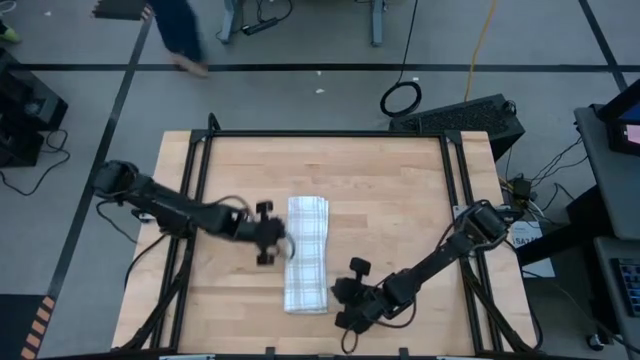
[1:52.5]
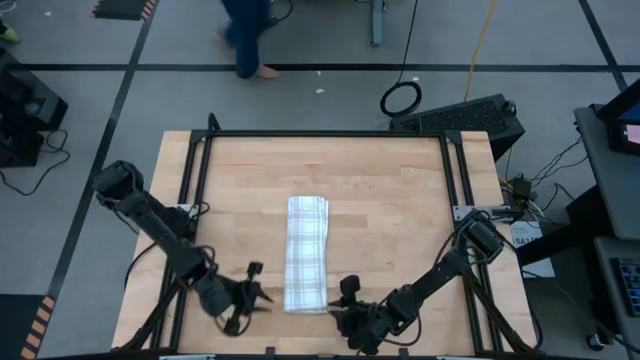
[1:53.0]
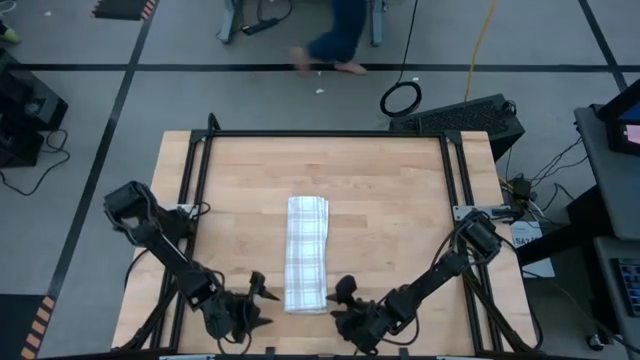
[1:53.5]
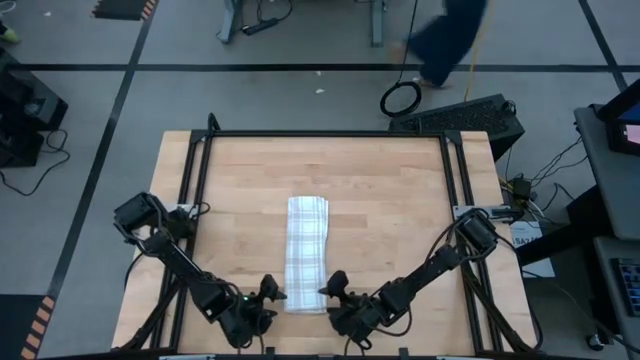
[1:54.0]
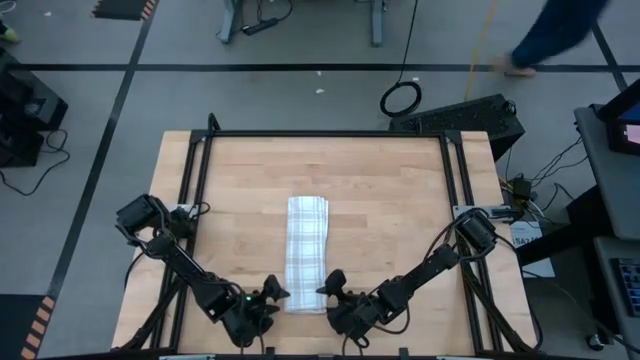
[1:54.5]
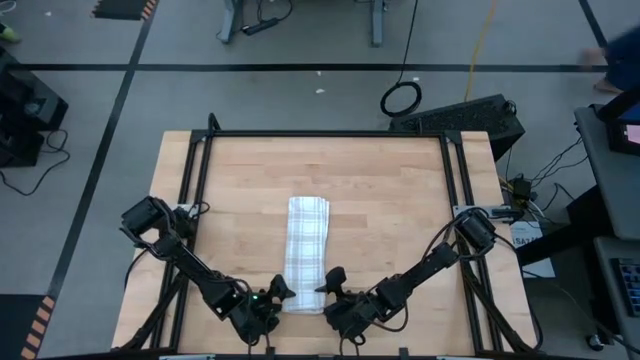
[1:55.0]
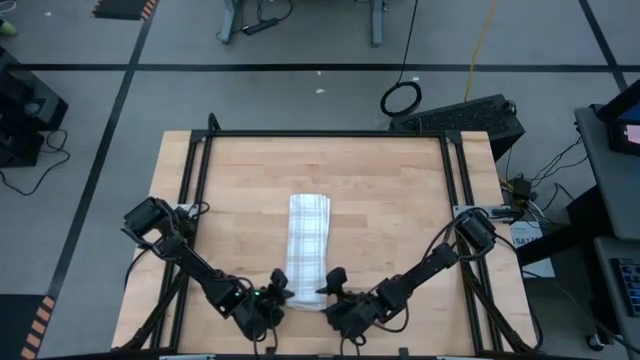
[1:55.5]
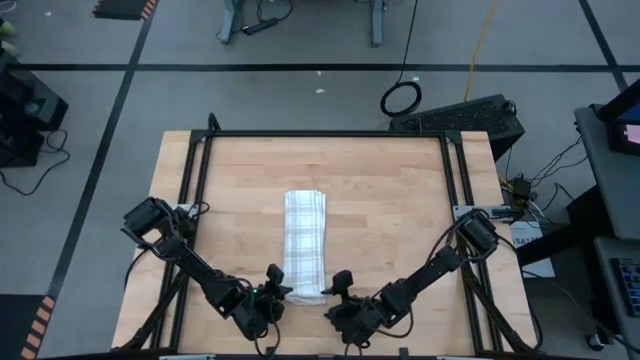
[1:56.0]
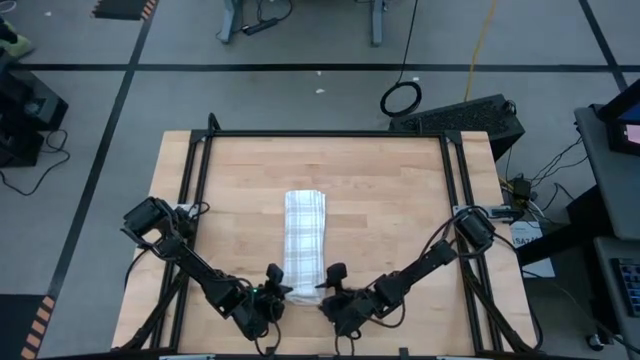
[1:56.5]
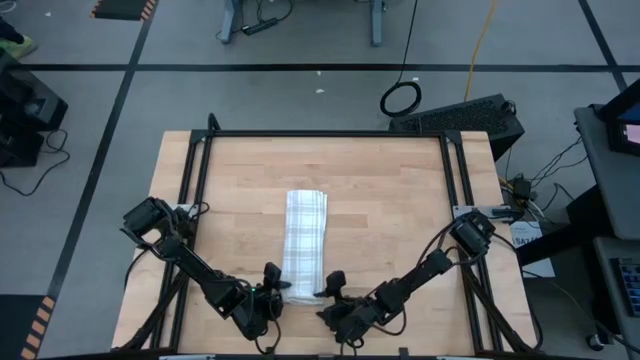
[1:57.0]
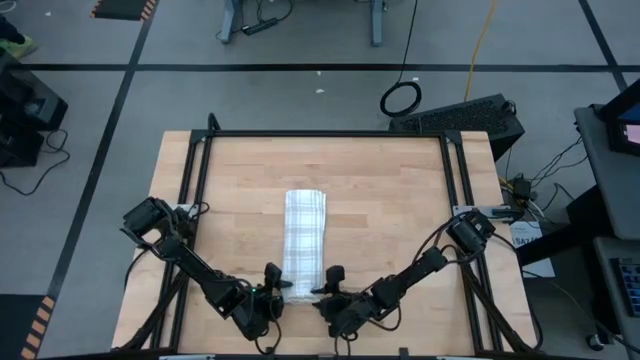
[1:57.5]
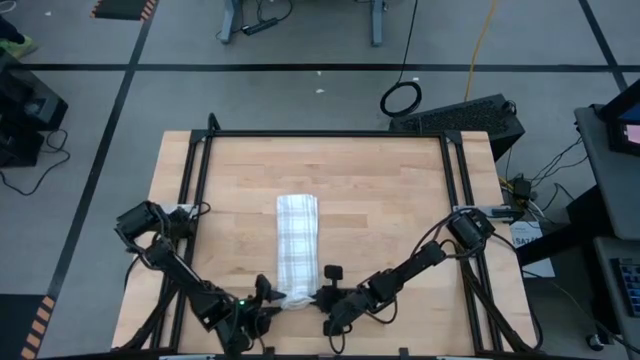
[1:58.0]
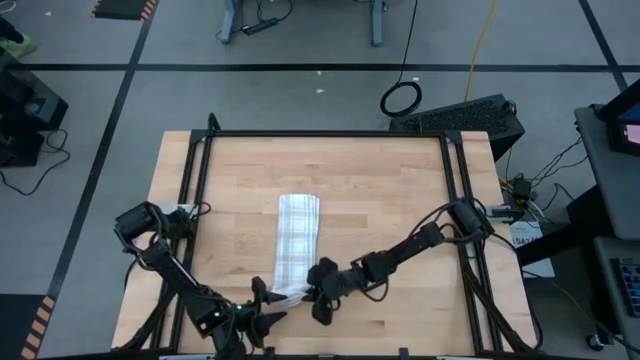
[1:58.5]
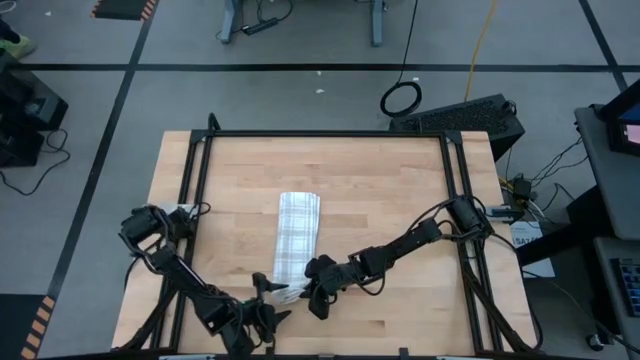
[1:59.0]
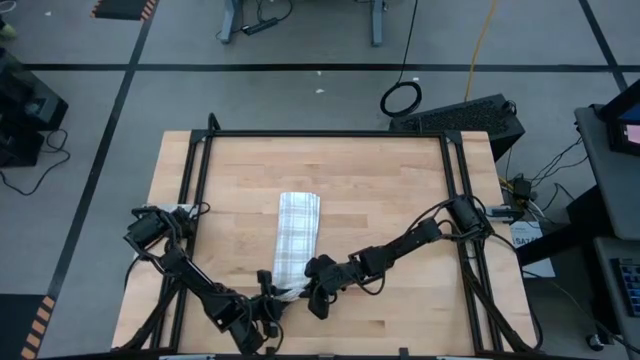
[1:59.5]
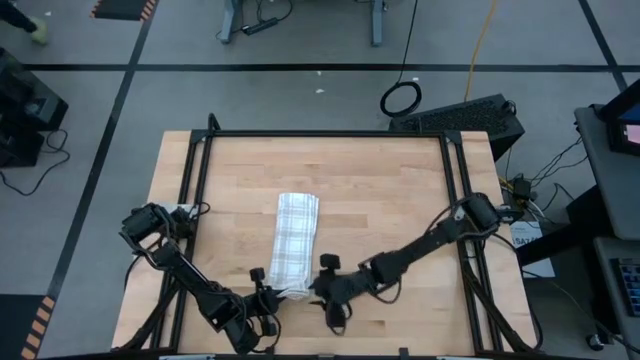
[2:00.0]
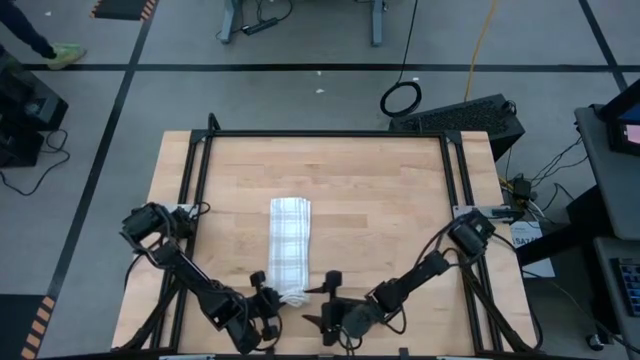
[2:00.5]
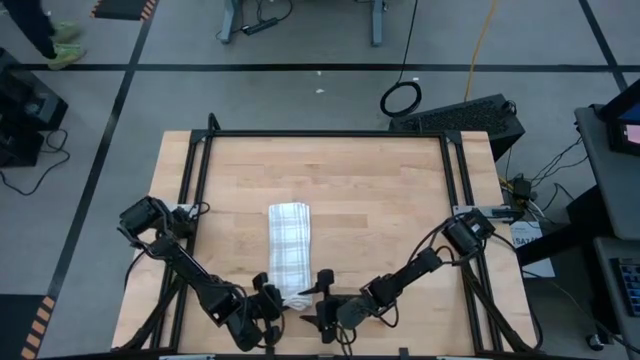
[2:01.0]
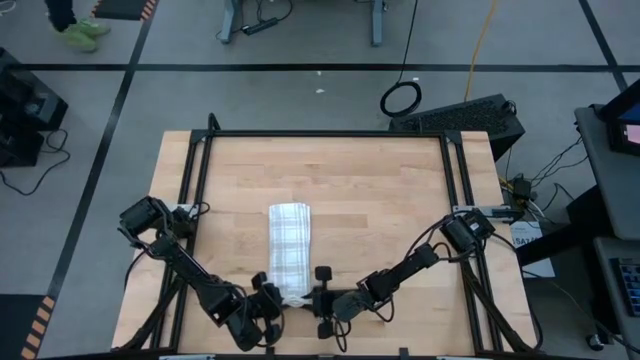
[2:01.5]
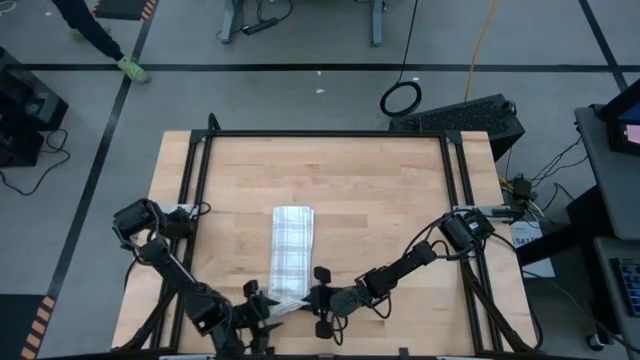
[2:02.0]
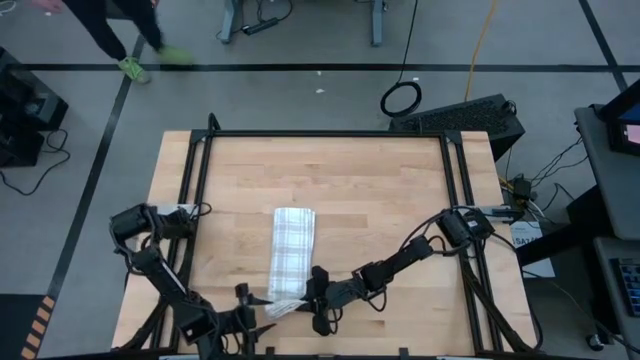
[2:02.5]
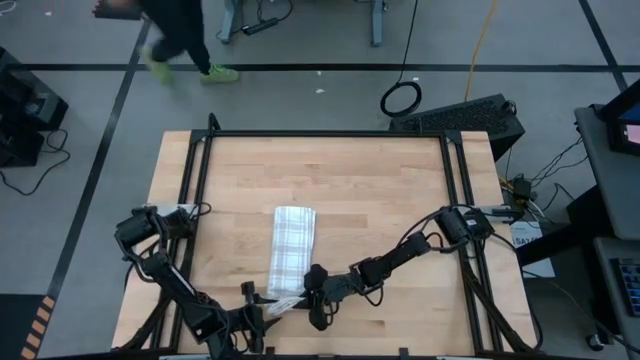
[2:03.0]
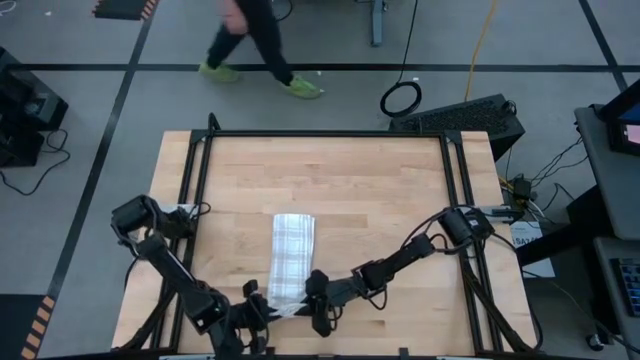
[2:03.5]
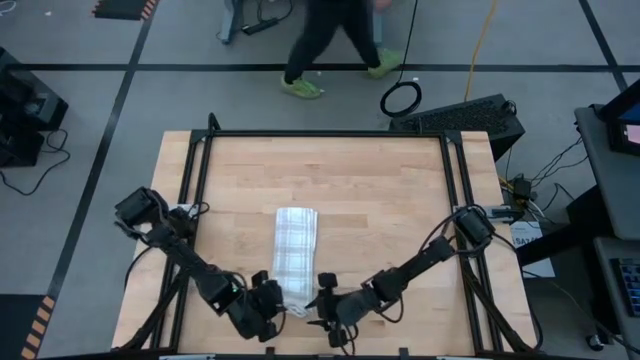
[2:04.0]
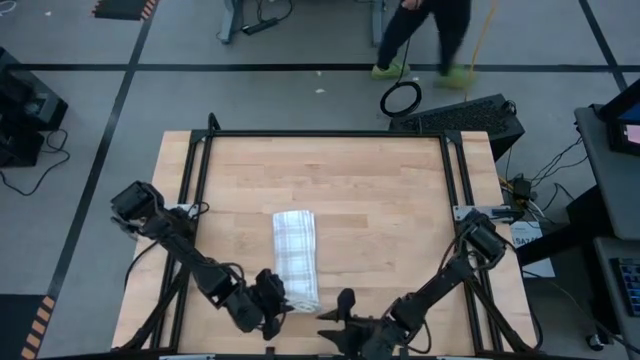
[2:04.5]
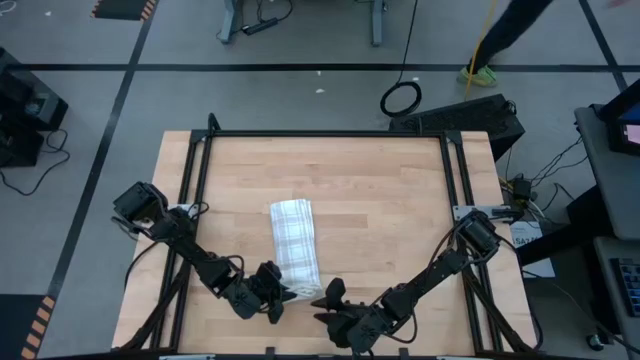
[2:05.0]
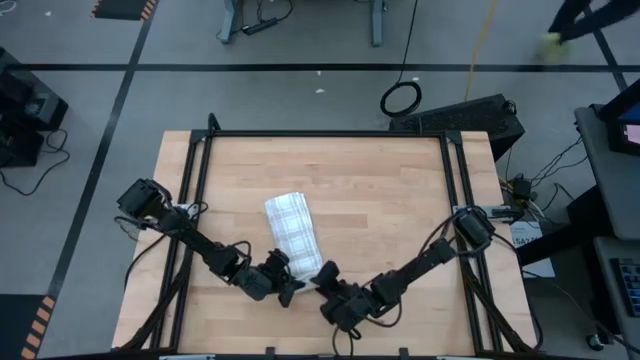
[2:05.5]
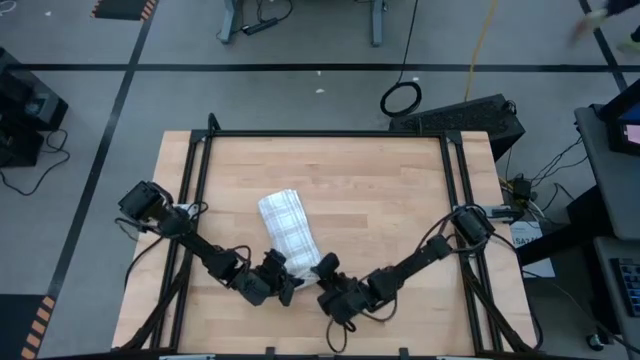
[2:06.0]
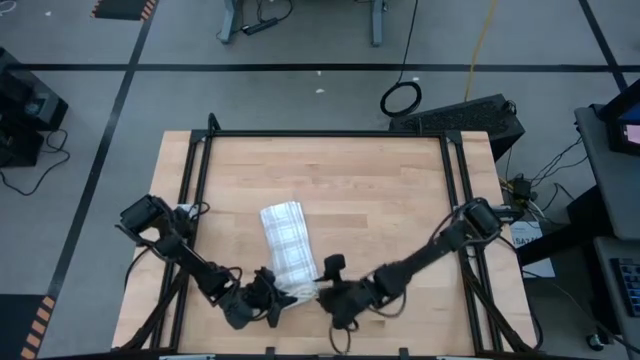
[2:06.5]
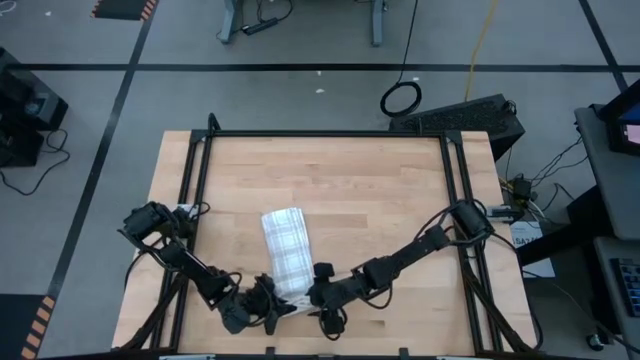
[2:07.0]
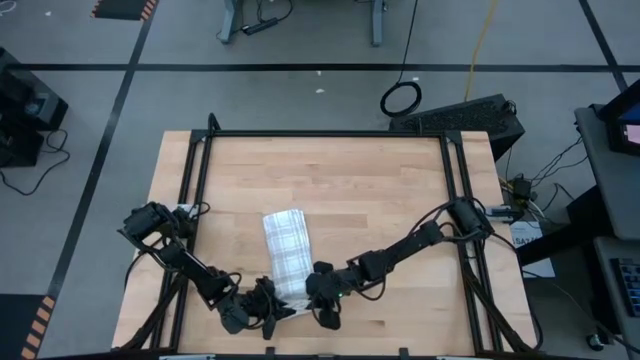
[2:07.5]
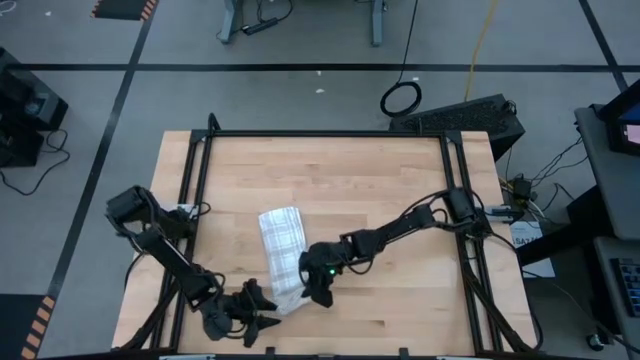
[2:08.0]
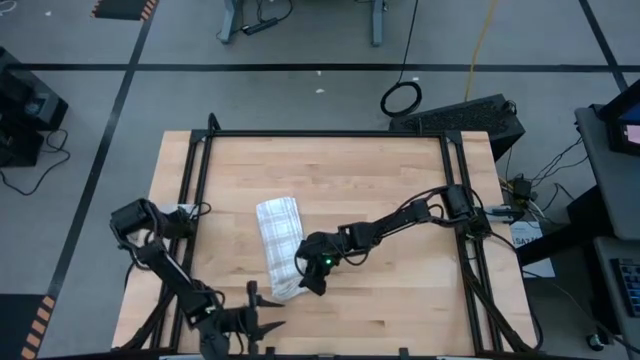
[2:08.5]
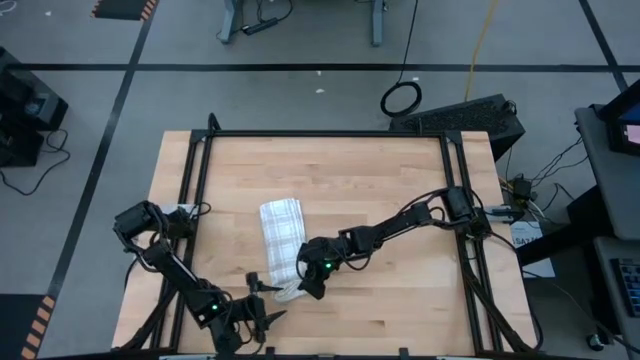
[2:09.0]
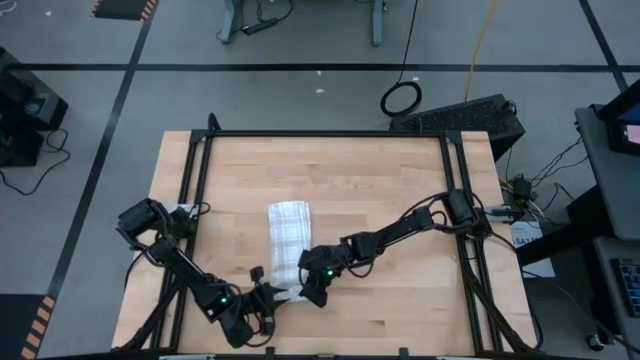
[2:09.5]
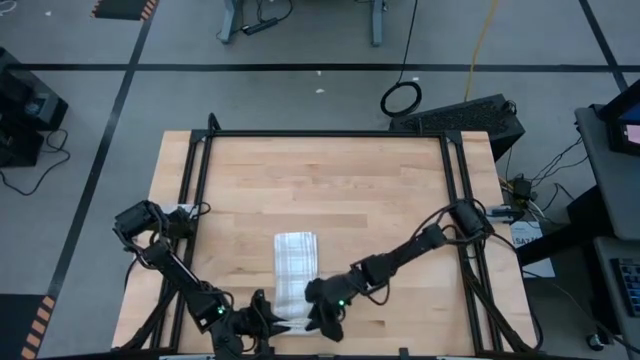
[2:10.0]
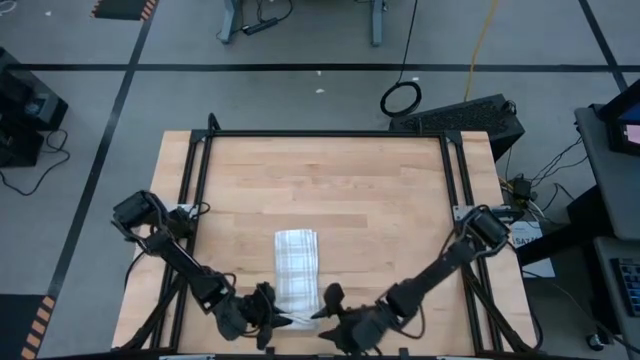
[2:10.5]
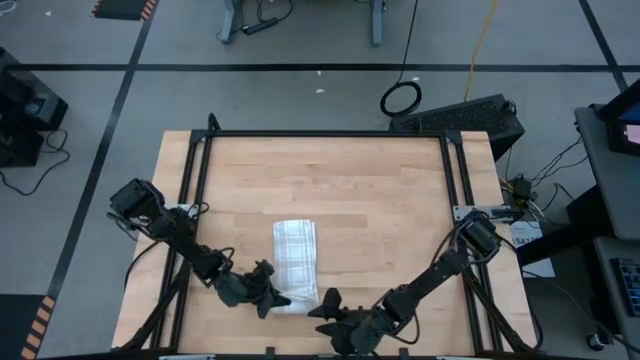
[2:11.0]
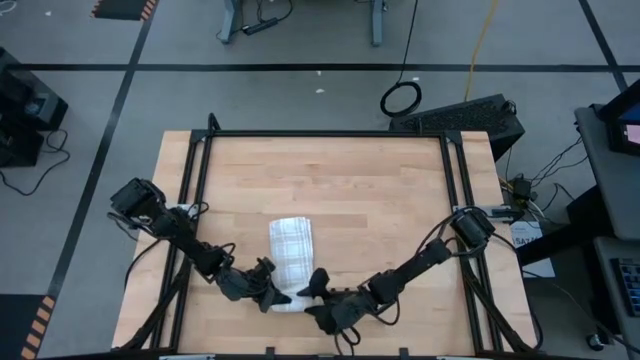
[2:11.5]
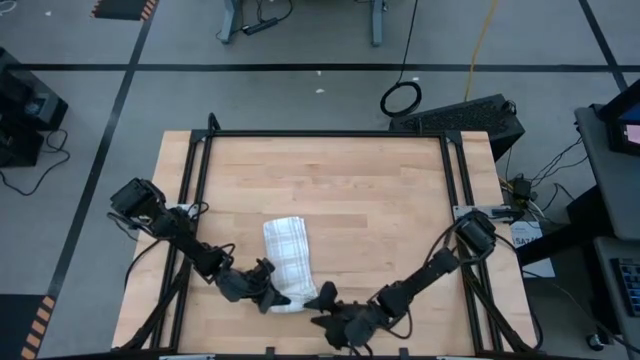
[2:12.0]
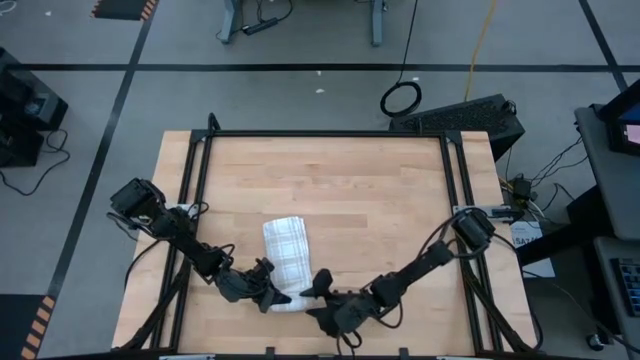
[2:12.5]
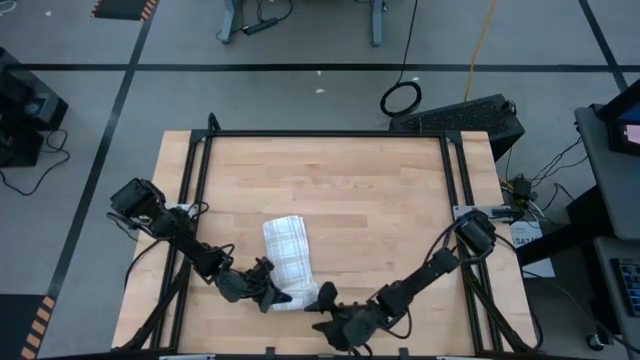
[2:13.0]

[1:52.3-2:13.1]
Task: Roll towel
Roll the brown checkered towel

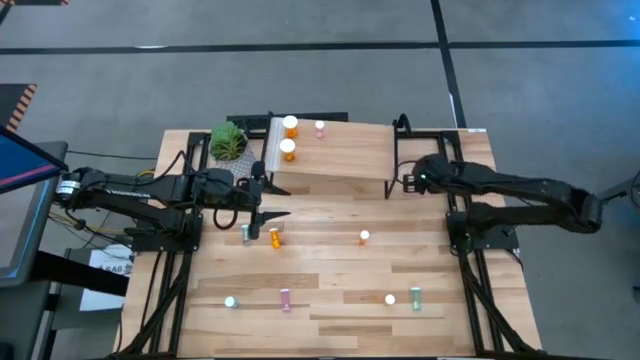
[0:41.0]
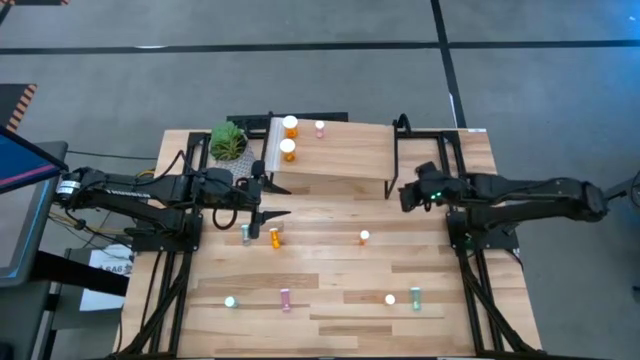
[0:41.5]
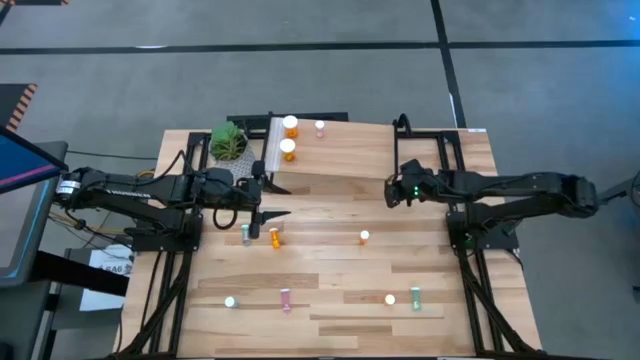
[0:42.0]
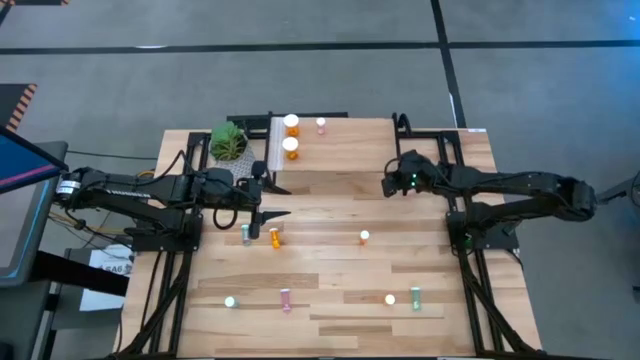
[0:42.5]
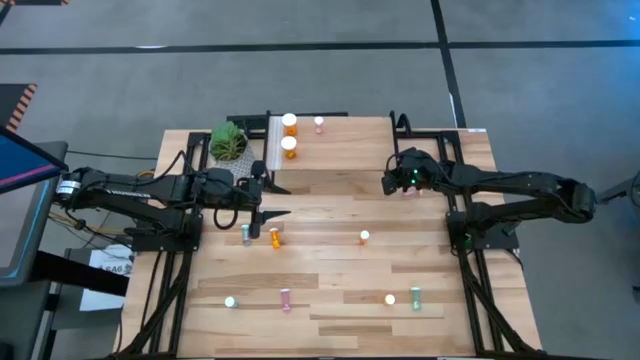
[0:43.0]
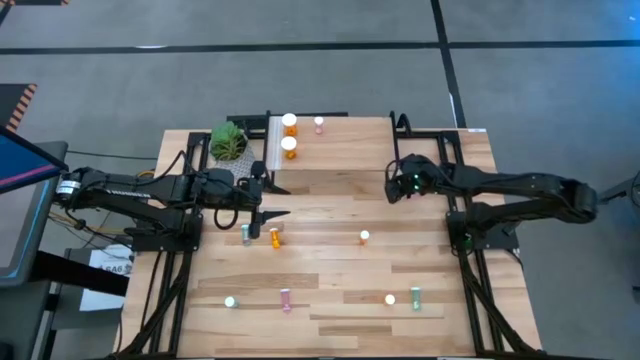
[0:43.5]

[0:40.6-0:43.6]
Task: Pick and place medicine bottles onto shelf by color
Adjust the shelf
